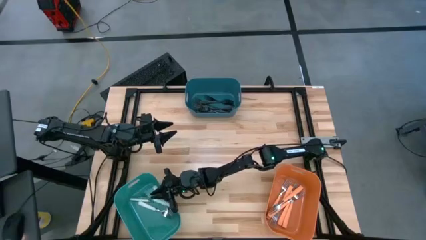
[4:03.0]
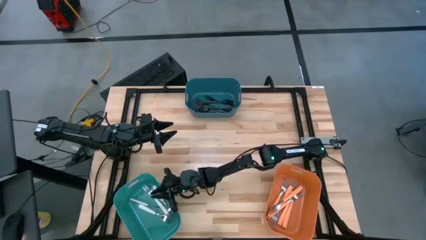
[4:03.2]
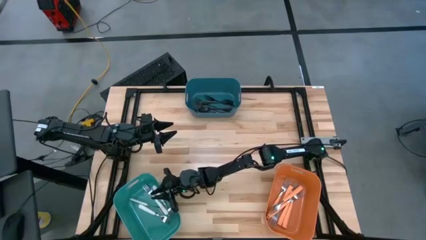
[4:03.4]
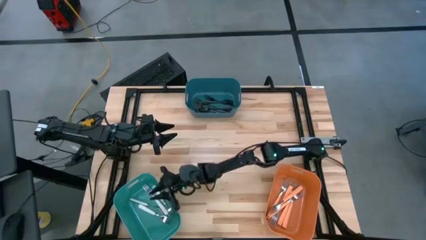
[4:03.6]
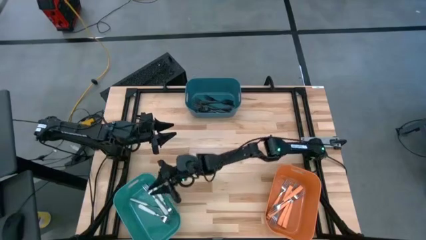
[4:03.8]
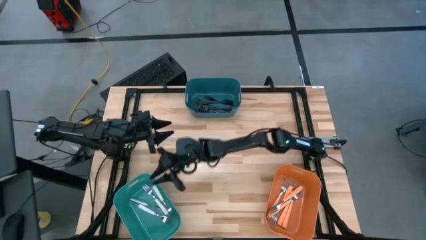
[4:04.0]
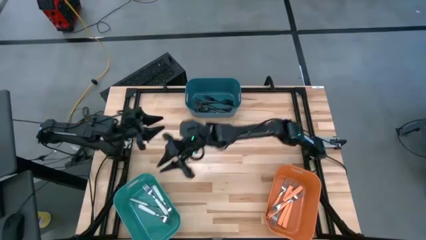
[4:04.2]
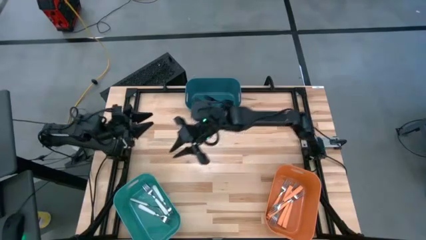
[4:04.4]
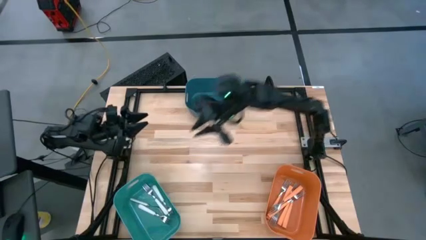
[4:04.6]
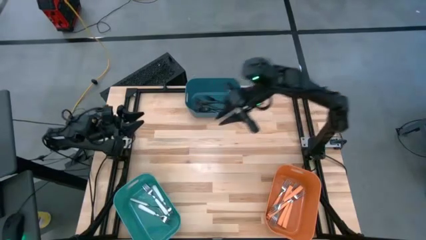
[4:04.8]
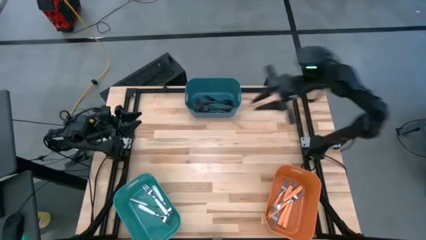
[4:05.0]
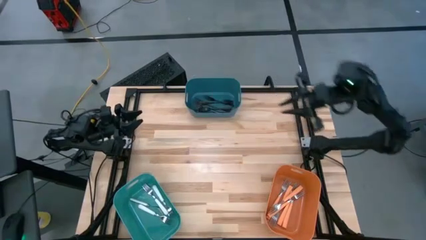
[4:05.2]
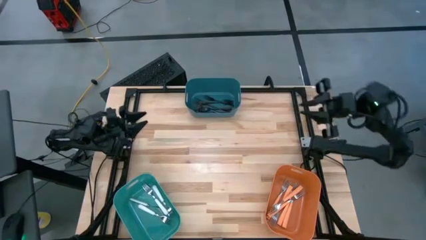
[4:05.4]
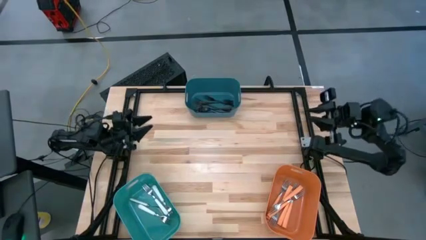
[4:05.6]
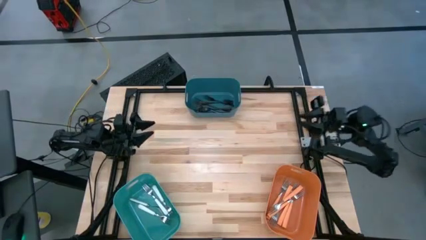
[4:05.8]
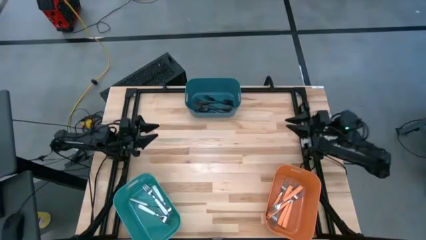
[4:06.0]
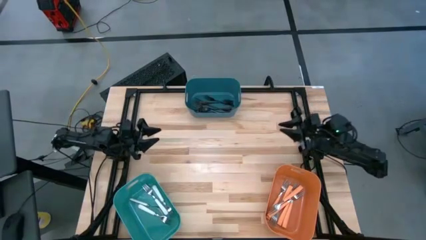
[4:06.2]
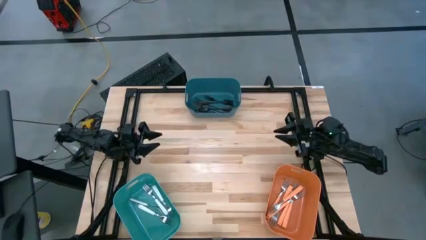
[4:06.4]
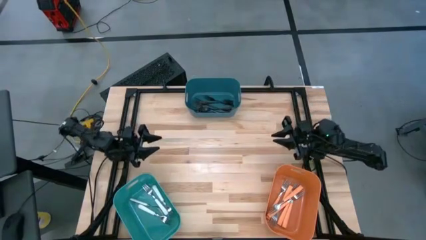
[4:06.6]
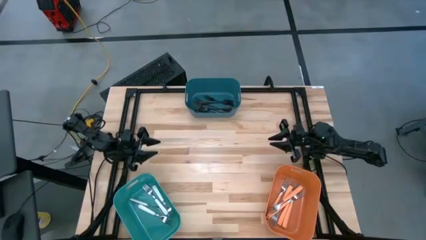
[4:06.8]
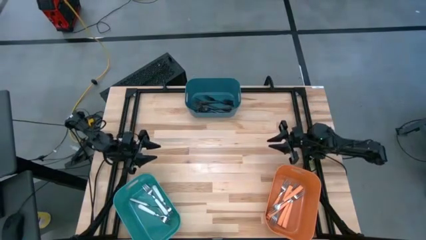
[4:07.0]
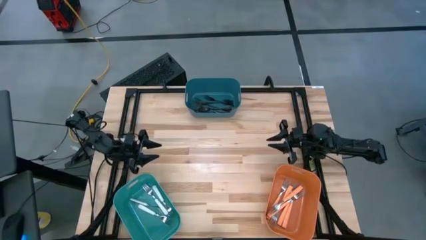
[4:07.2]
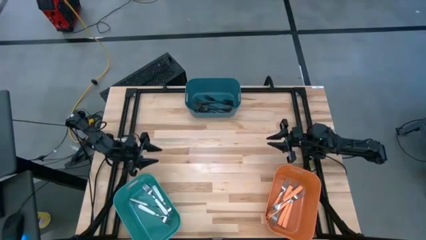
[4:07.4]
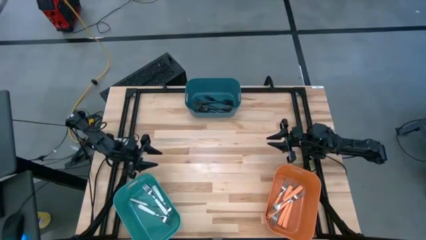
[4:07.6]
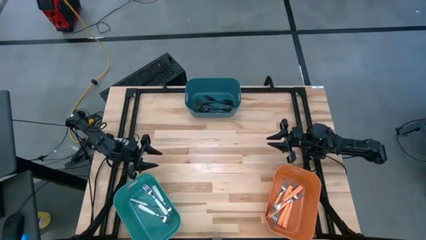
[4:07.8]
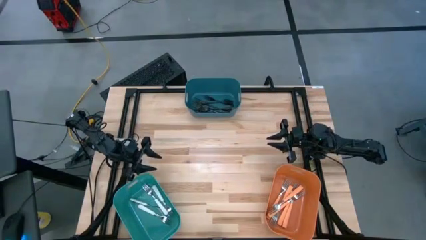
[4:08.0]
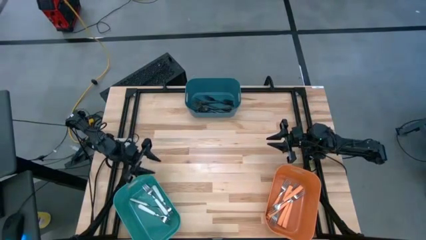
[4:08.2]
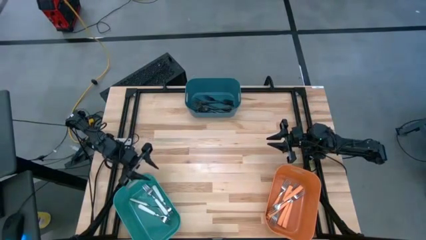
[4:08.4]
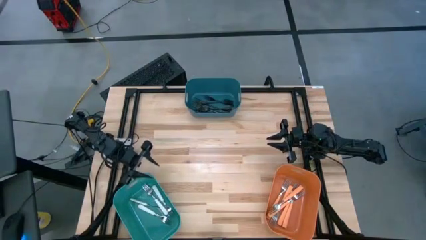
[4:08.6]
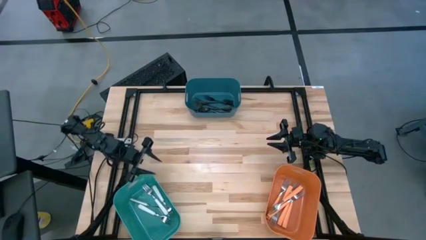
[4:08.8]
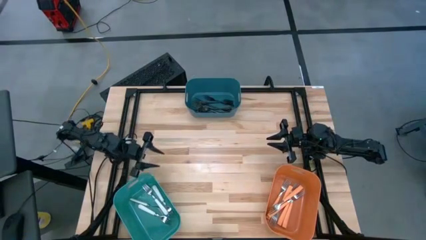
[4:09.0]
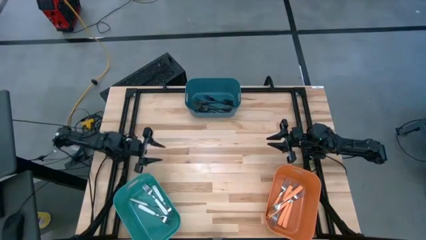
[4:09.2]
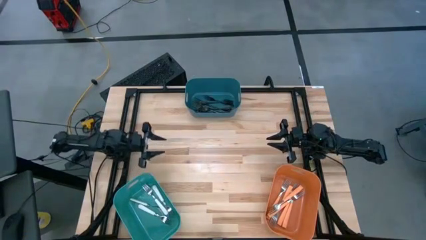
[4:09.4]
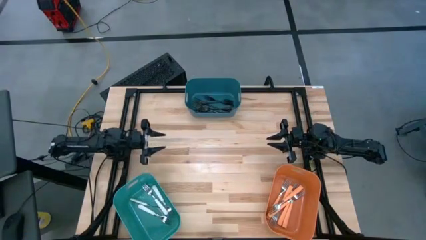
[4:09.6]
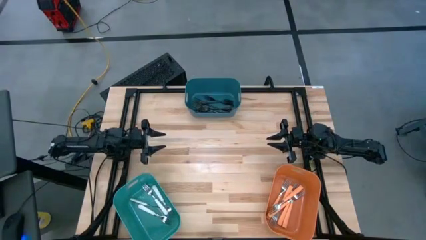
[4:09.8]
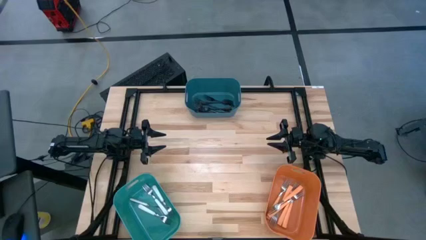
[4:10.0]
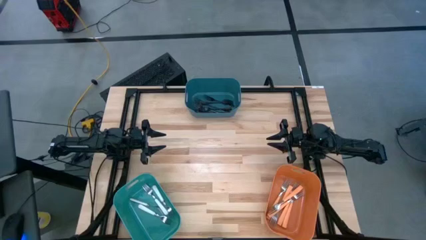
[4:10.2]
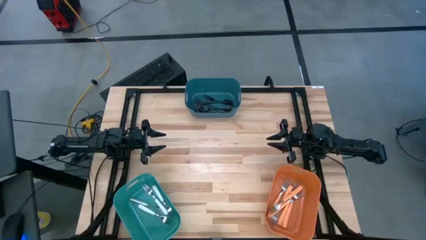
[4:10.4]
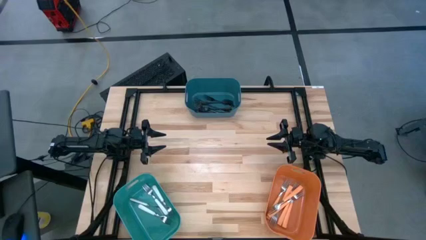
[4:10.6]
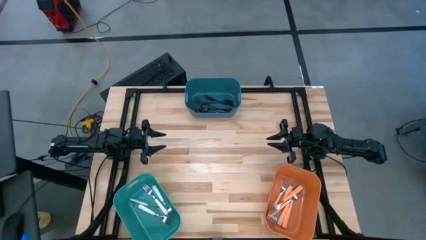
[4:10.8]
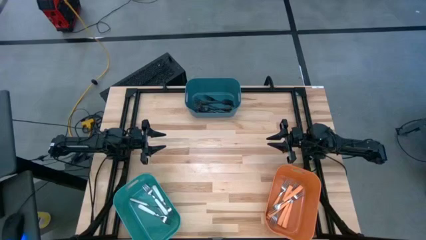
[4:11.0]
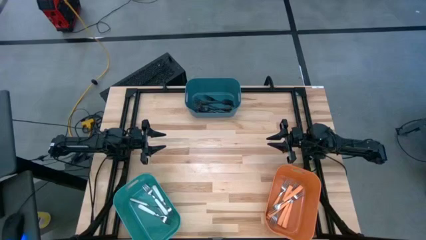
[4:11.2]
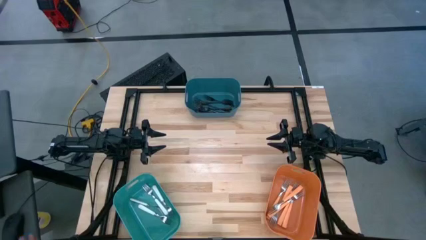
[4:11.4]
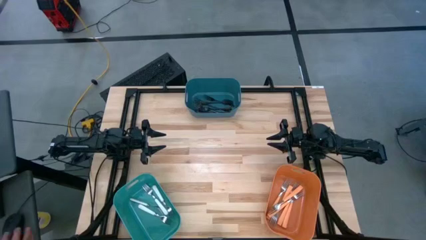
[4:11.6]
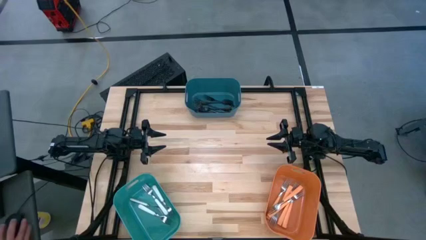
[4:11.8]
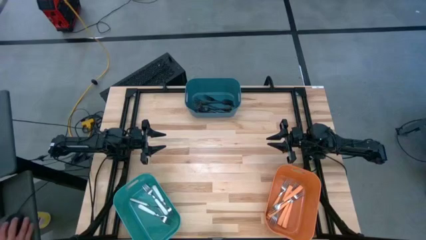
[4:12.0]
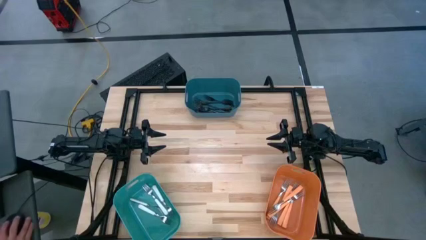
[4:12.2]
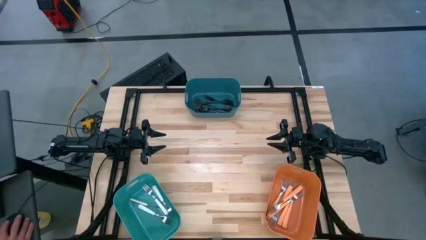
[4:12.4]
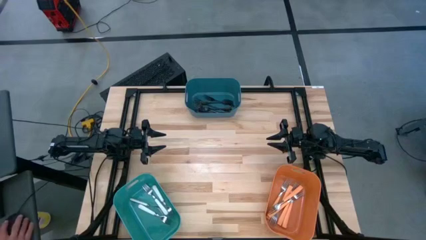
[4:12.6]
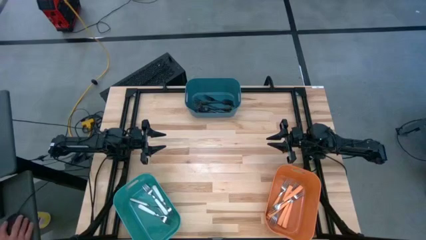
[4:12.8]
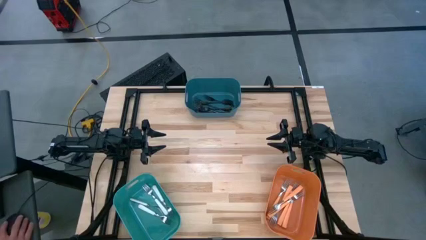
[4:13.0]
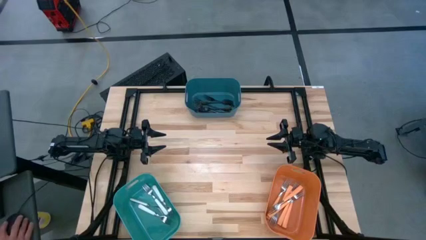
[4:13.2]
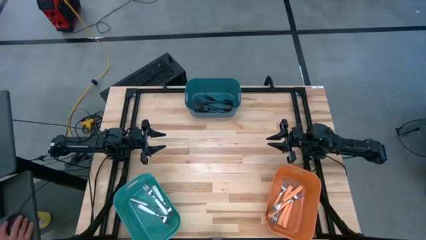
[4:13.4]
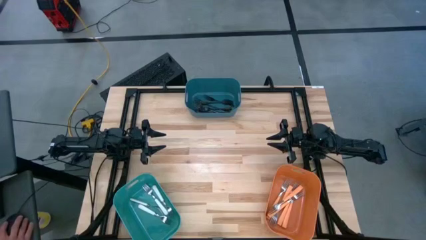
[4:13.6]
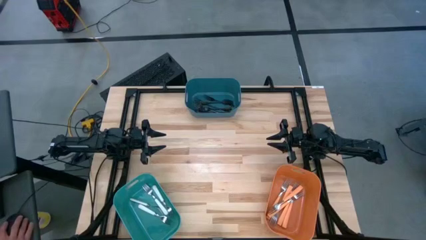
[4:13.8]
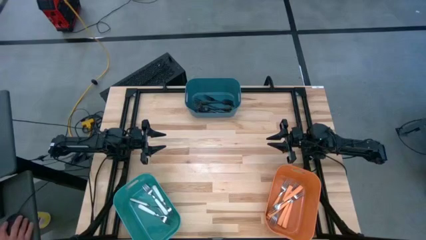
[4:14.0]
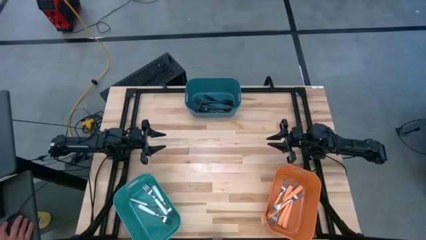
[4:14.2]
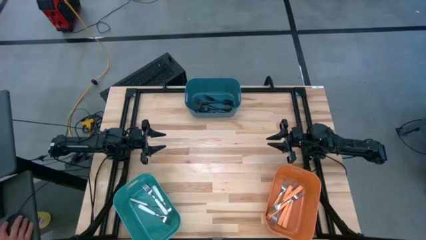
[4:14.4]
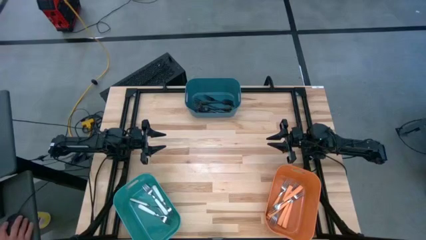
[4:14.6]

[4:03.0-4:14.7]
Task: Sort silverware by color (type)
Return to Home Position
